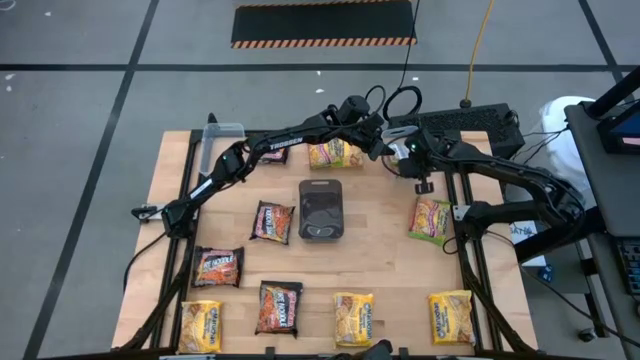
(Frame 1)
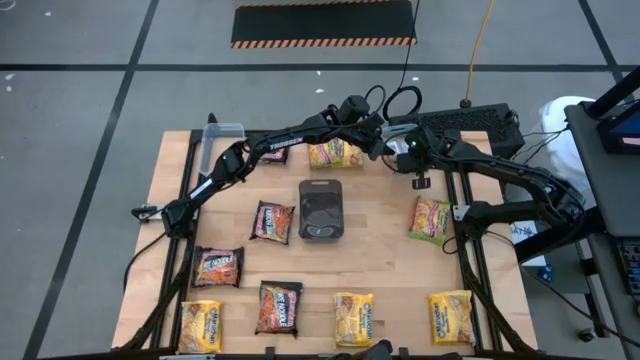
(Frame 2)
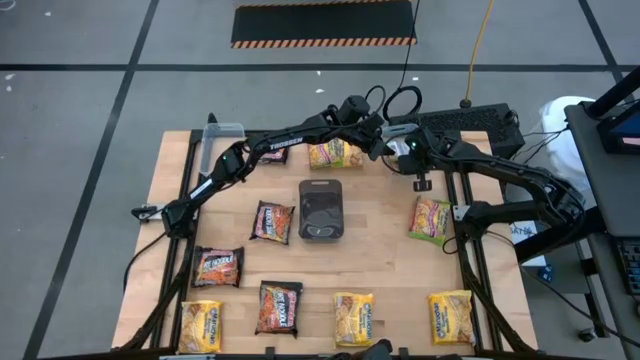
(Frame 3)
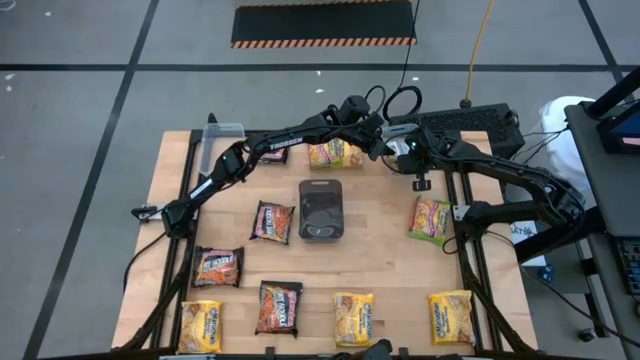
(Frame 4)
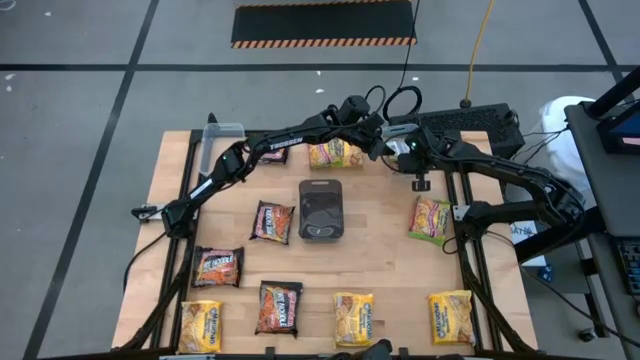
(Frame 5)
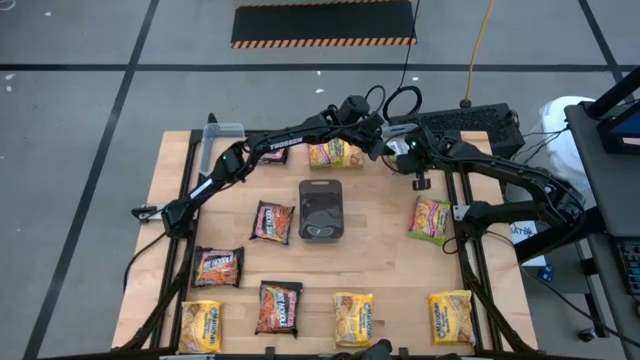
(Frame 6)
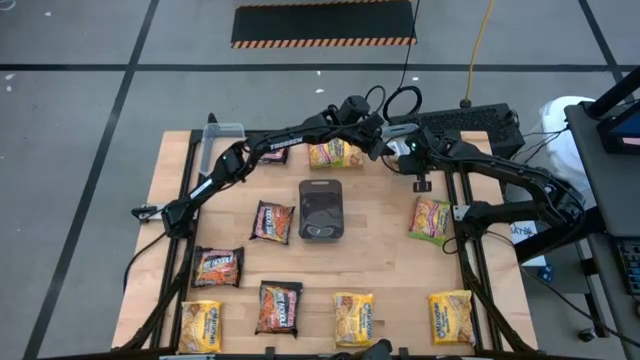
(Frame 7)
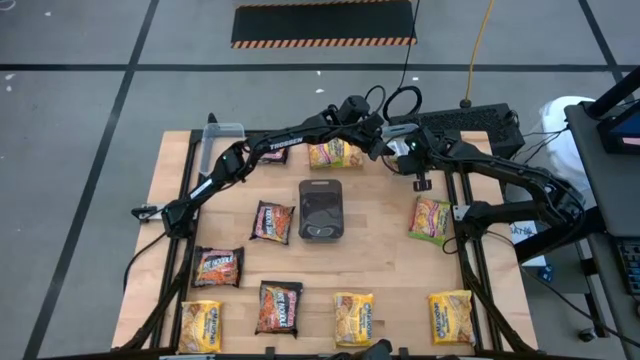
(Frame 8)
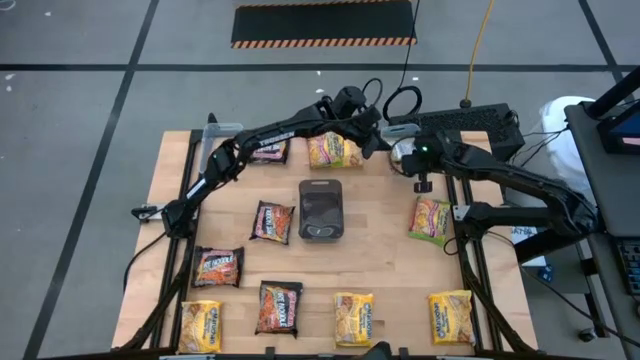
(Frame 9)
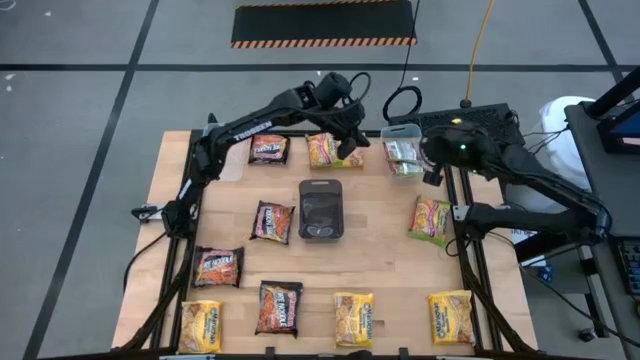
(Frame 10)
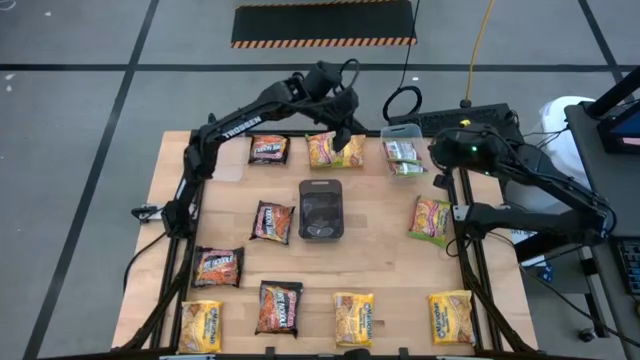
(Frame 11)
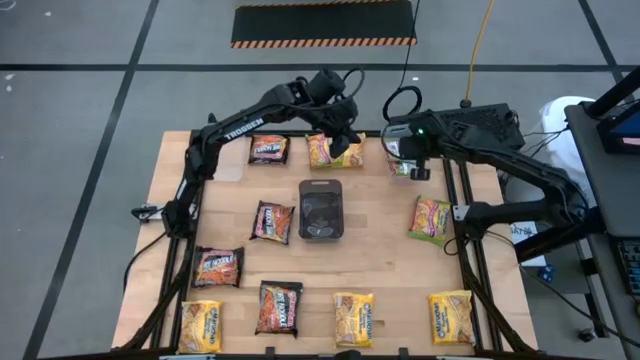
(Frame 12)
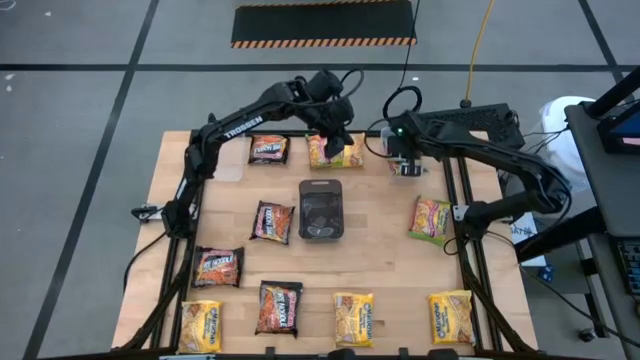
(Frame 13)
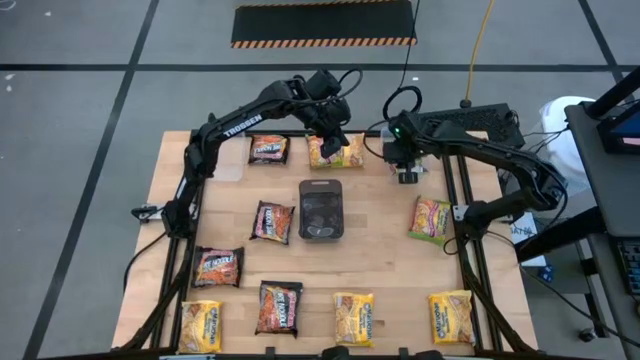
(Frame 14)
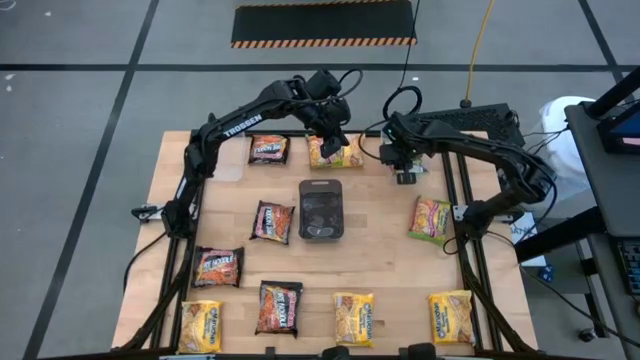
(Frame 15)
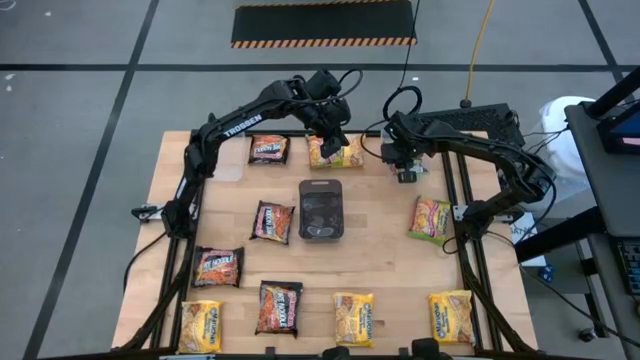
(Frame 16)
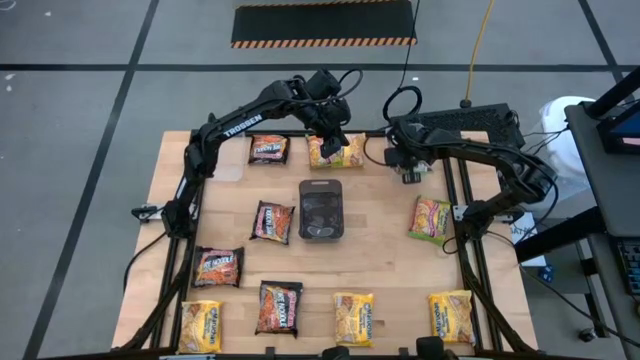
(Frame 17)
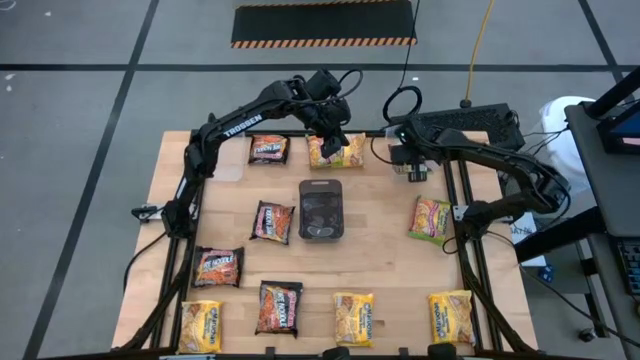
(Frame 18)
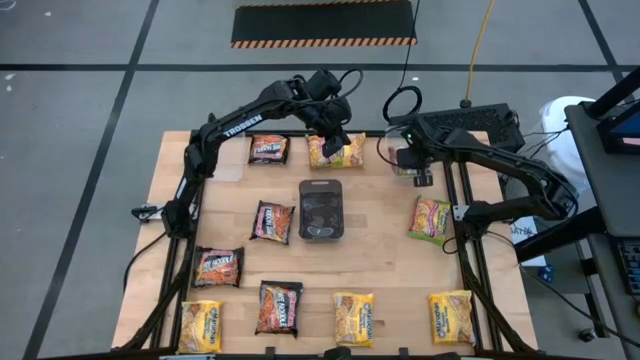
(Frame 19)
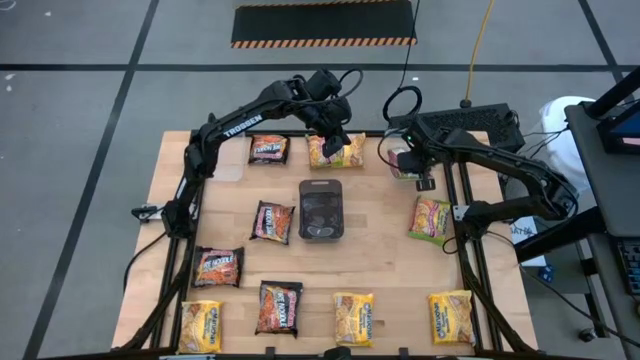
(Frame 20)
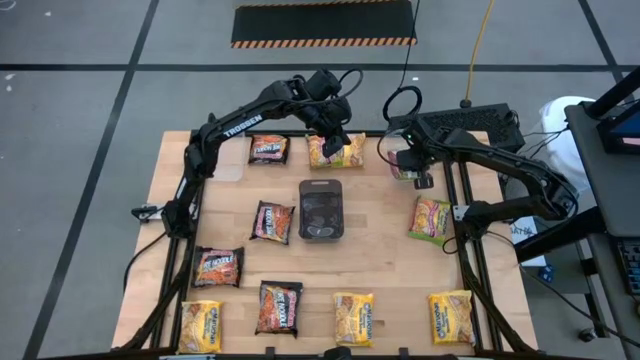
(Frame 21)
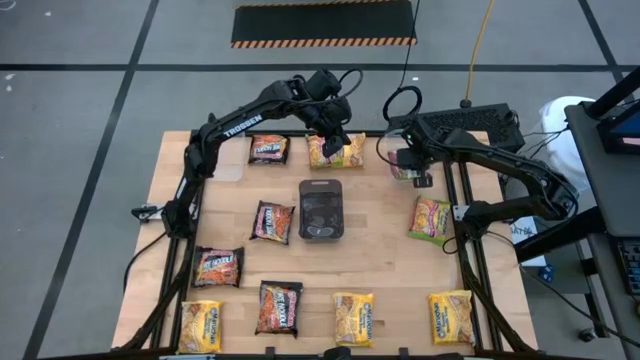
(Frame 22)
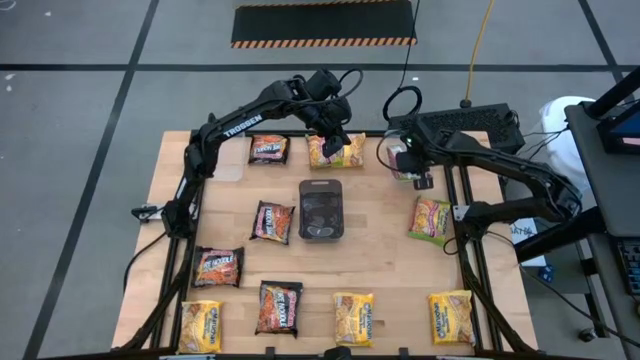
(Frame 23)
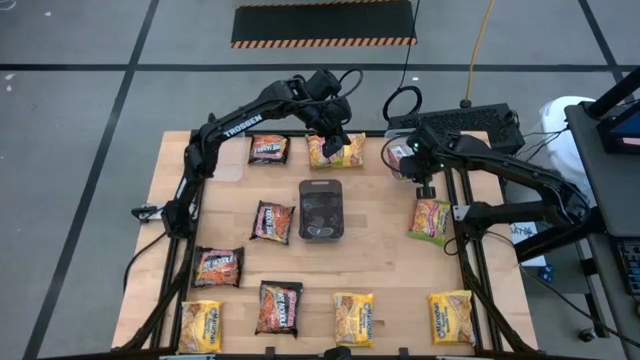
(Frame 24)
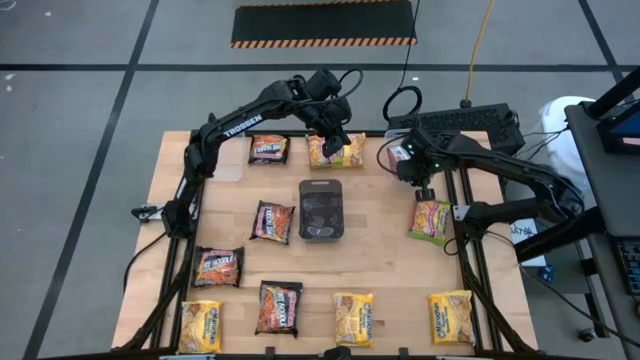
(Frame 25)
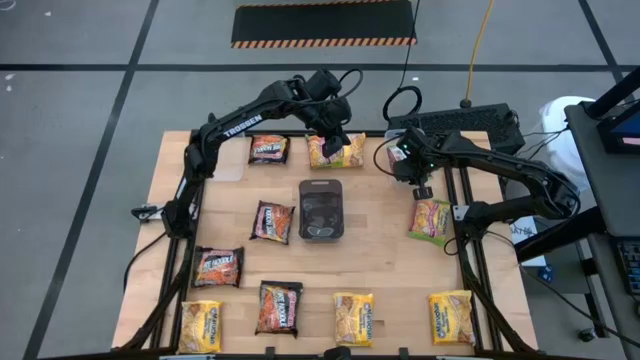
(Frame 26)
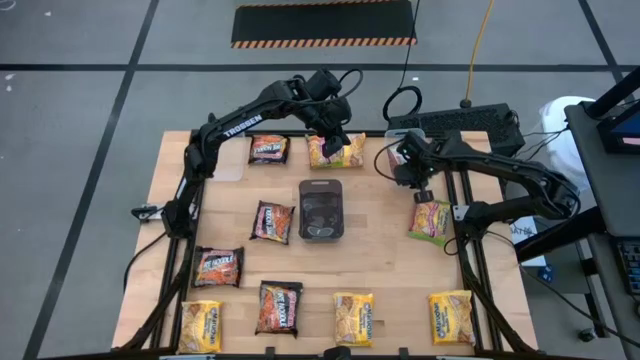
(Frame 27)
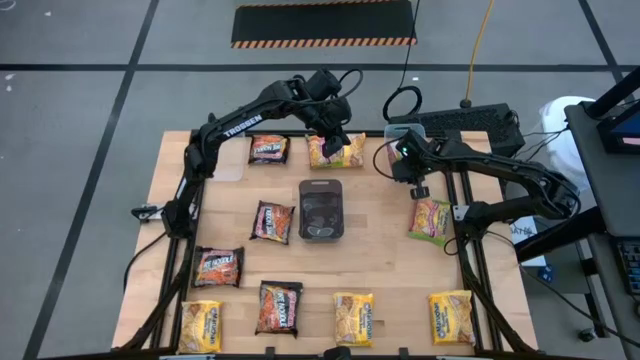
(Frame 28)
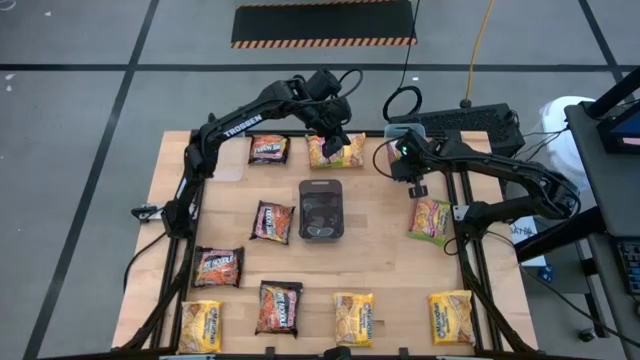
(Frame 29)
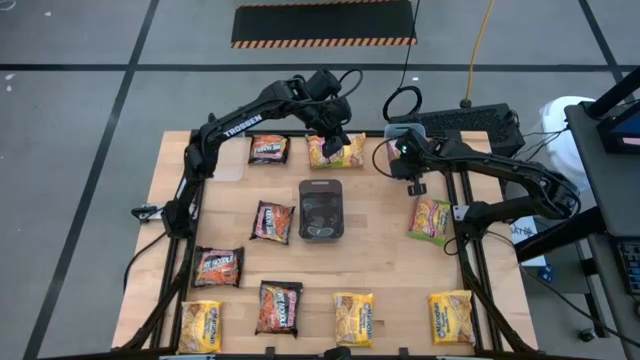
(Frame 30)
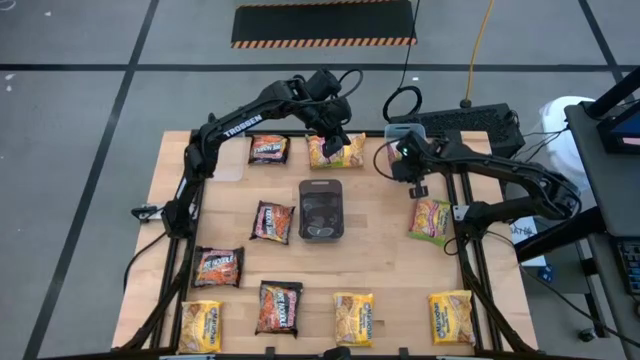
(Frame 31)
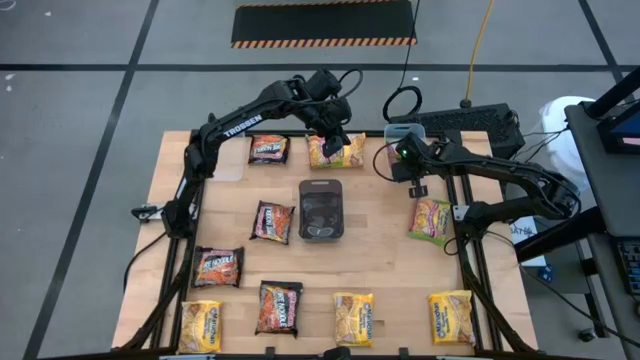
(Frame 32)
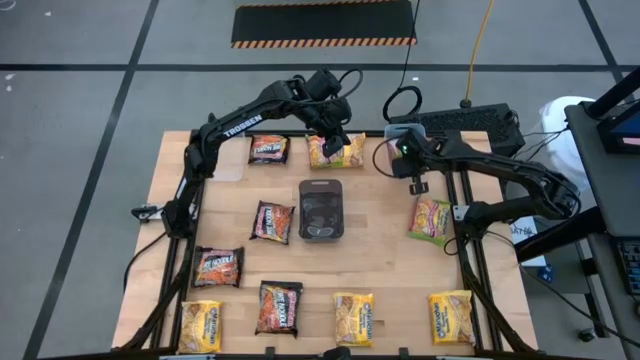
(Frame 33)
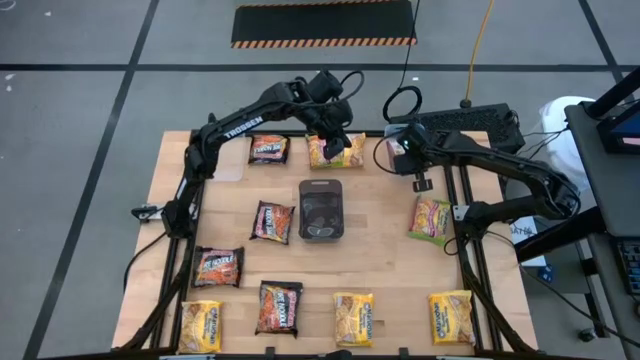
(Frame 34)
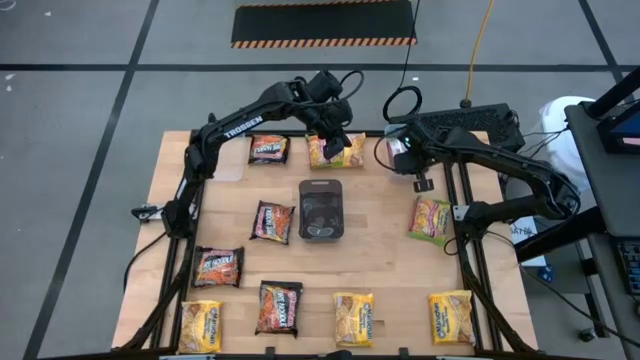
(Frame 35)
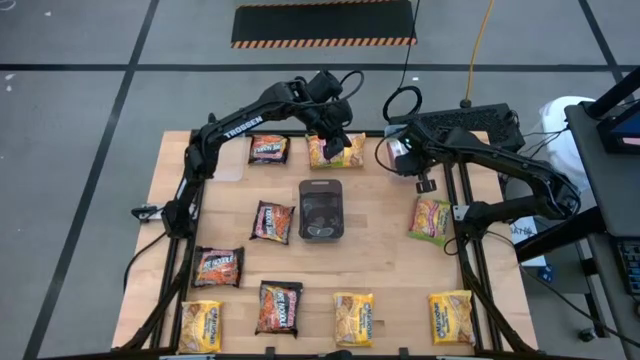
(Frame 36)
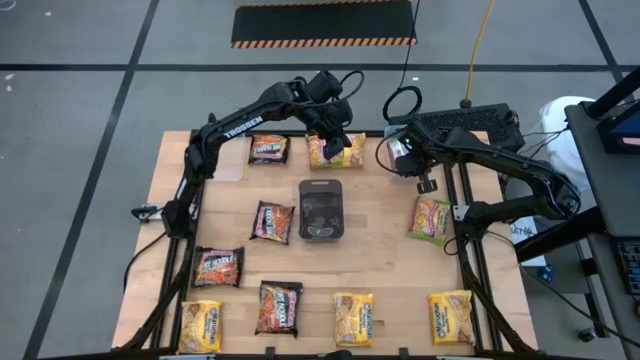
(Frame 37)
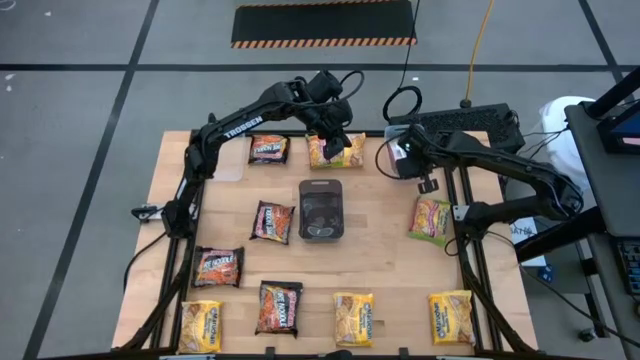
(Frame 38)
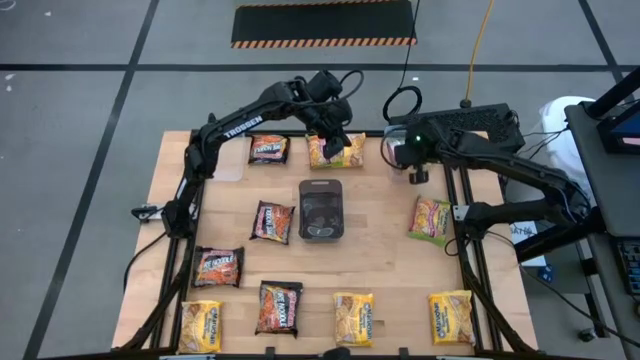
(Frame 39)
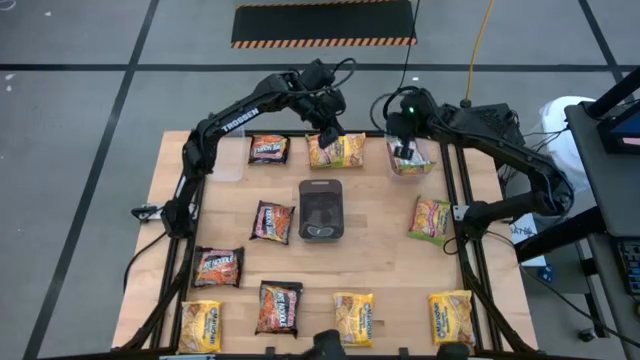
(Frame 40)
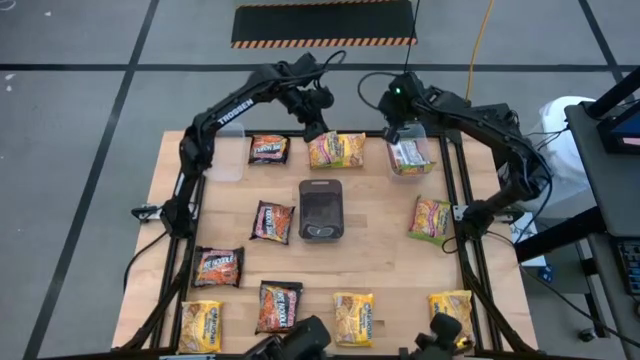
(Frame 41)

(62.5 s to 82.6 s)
Task: Sort Maruchan noodles
Adjust the green noodle pack
